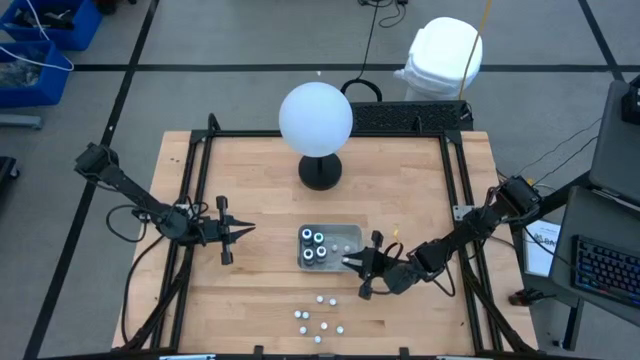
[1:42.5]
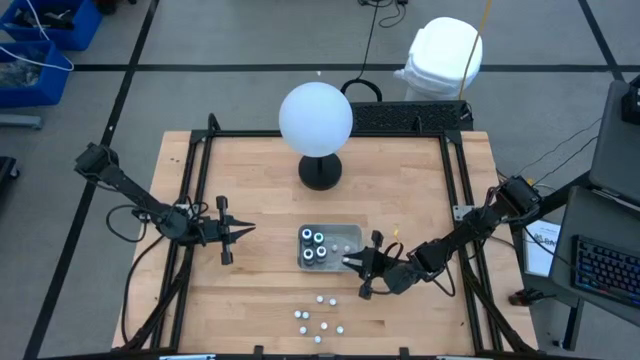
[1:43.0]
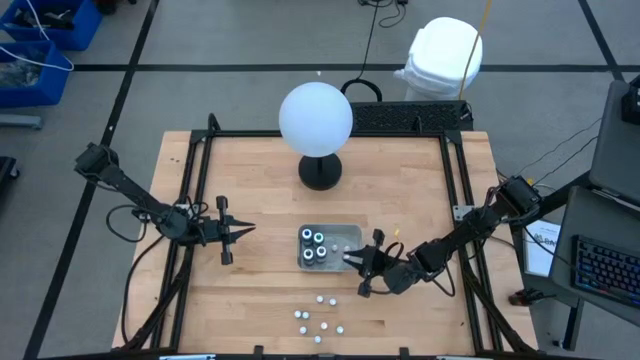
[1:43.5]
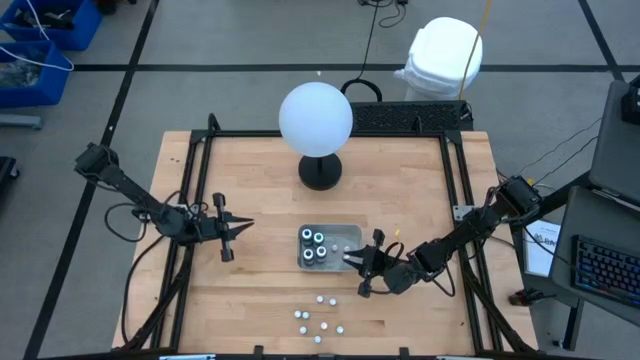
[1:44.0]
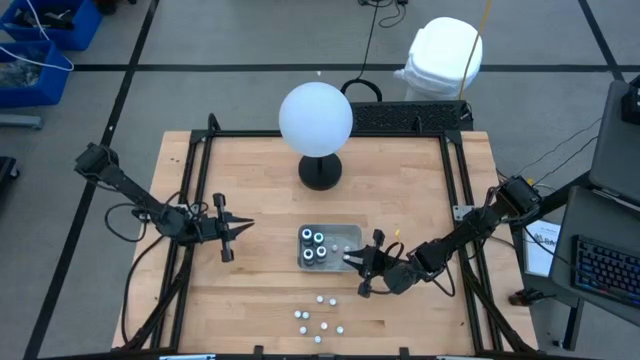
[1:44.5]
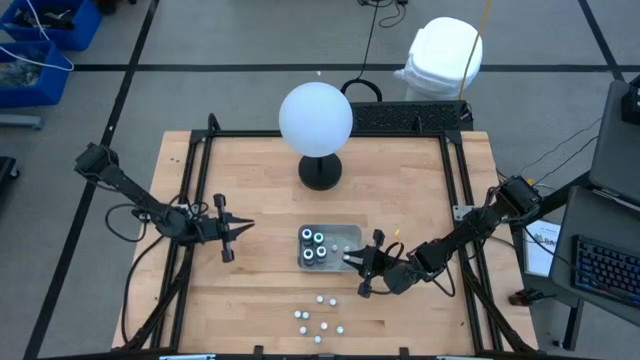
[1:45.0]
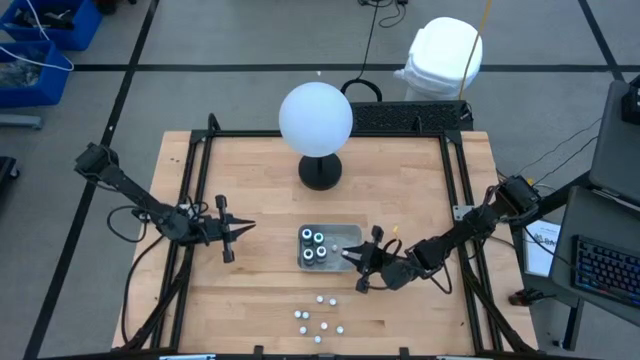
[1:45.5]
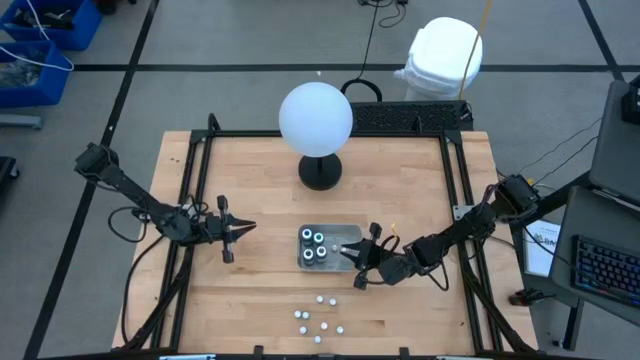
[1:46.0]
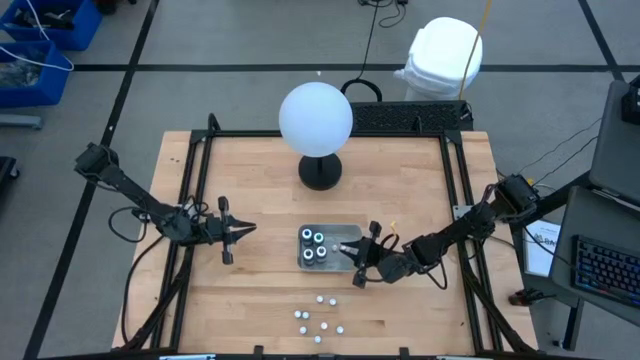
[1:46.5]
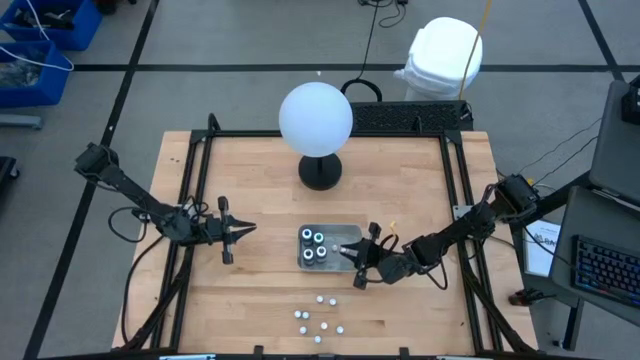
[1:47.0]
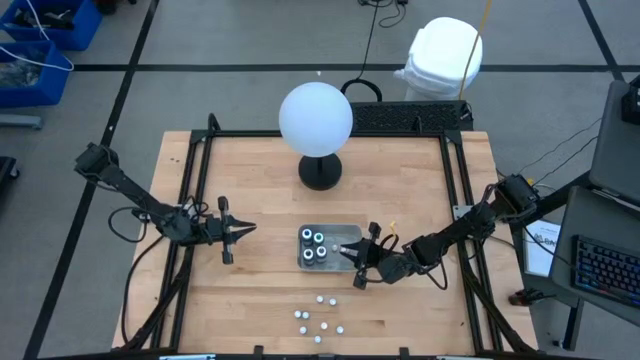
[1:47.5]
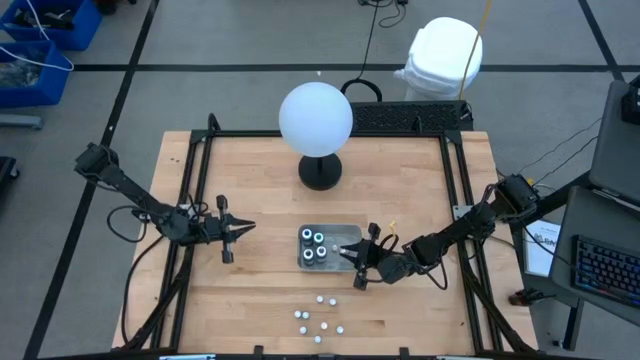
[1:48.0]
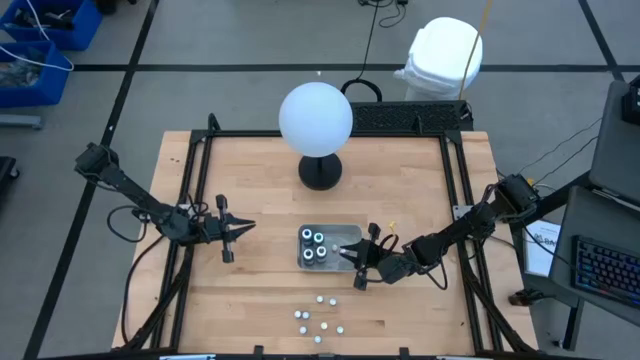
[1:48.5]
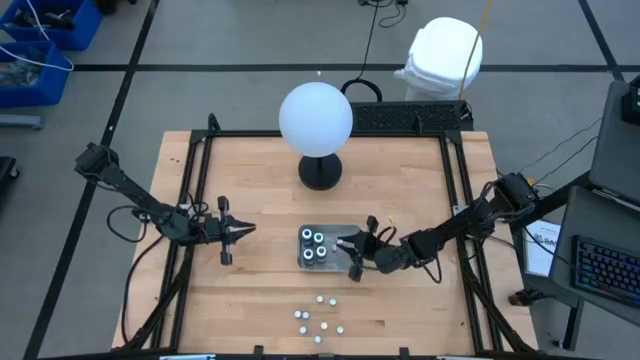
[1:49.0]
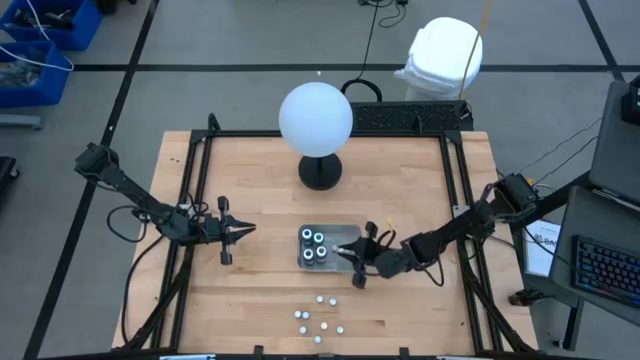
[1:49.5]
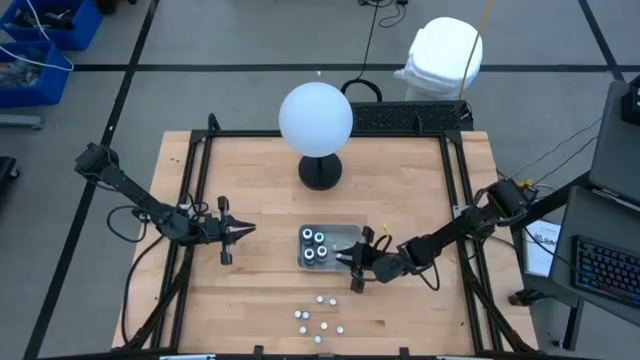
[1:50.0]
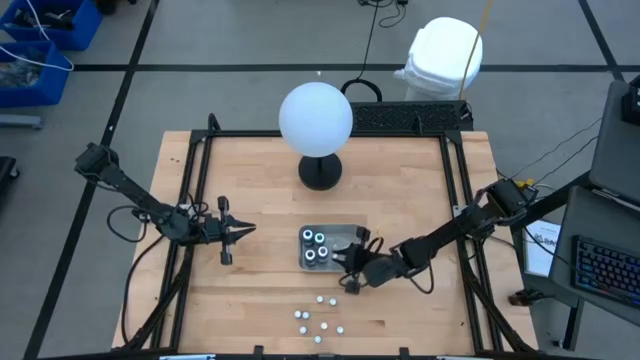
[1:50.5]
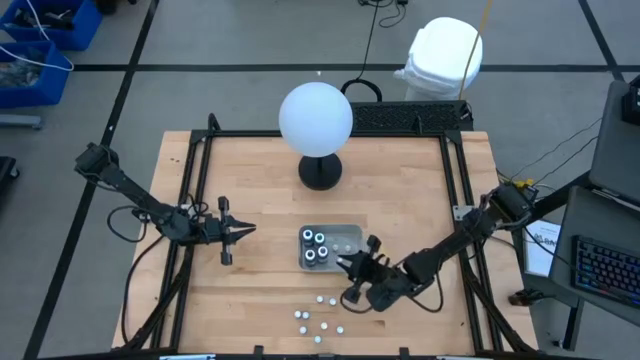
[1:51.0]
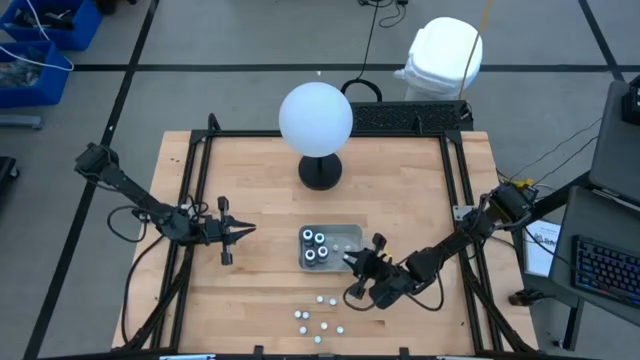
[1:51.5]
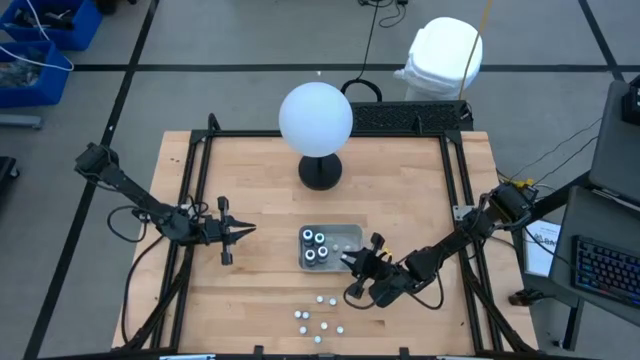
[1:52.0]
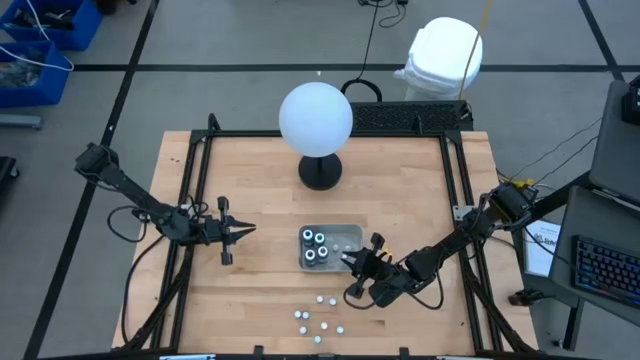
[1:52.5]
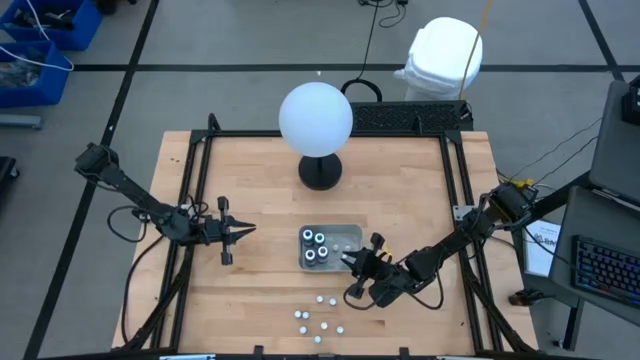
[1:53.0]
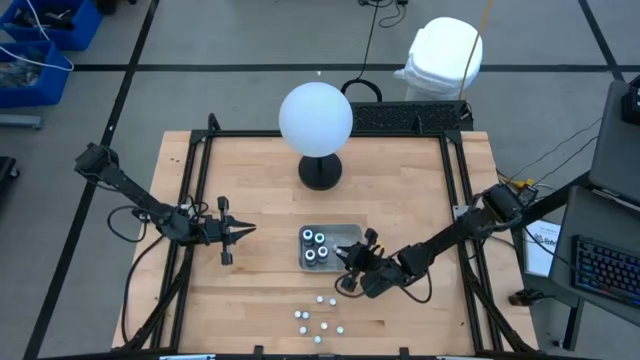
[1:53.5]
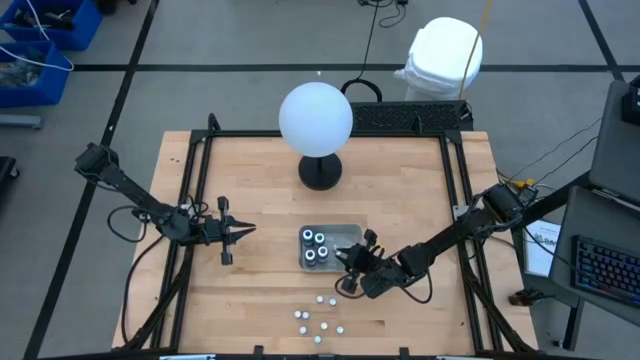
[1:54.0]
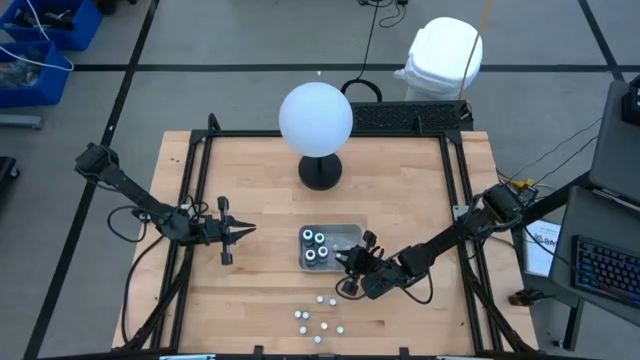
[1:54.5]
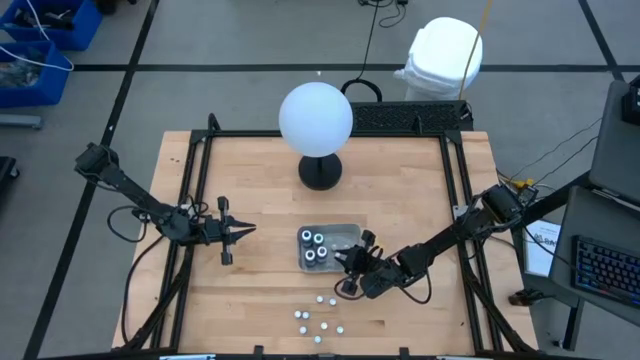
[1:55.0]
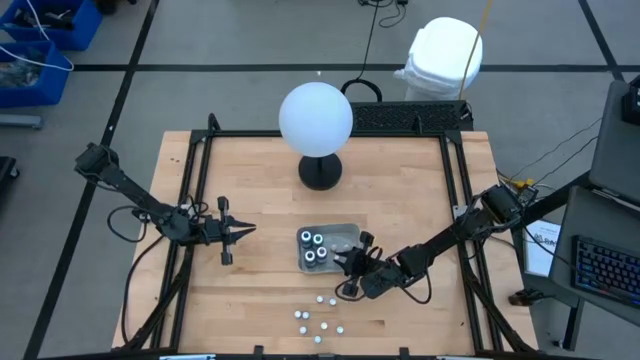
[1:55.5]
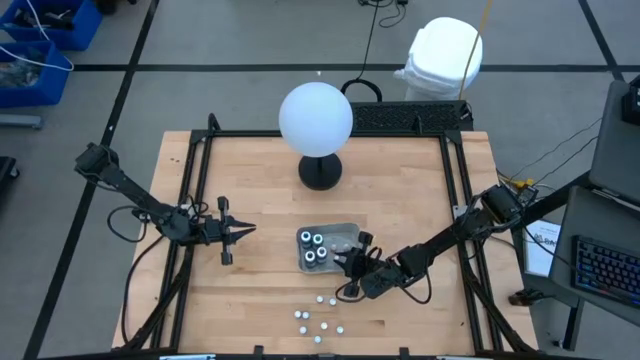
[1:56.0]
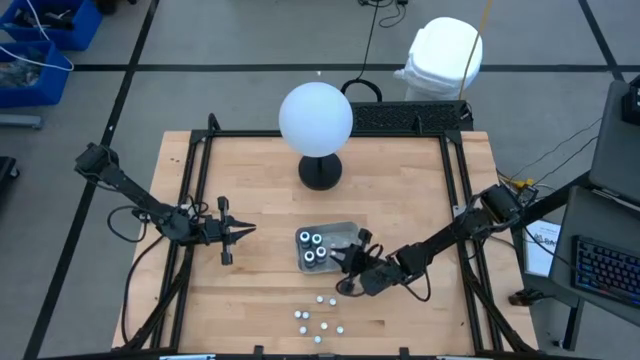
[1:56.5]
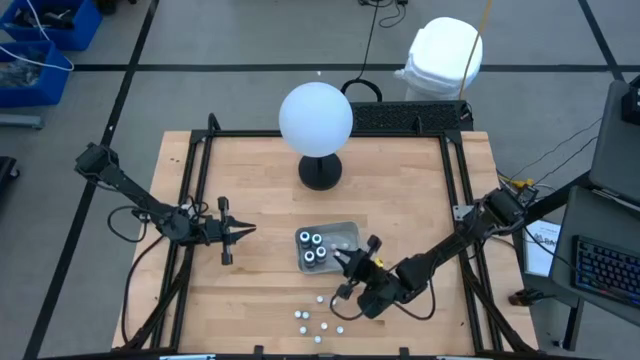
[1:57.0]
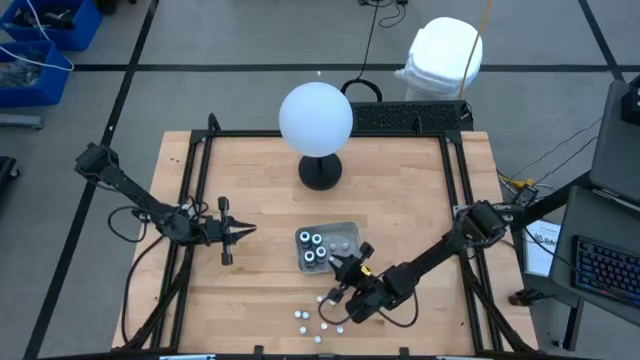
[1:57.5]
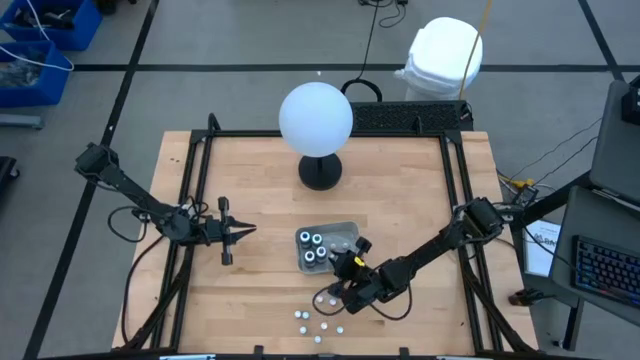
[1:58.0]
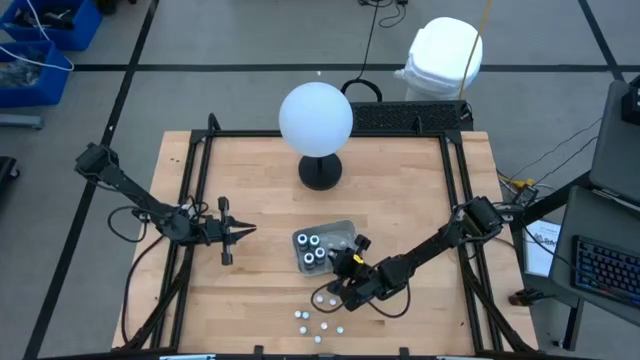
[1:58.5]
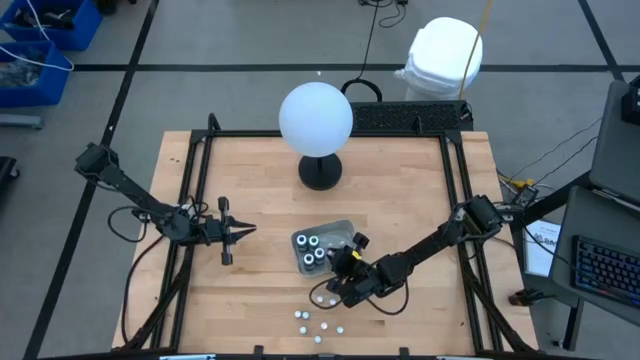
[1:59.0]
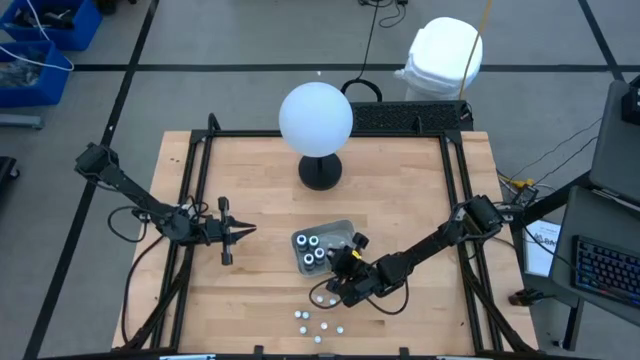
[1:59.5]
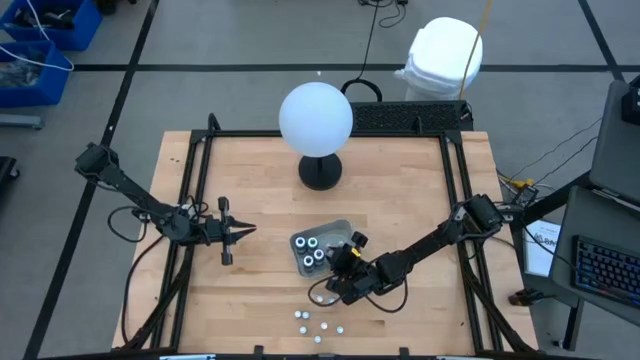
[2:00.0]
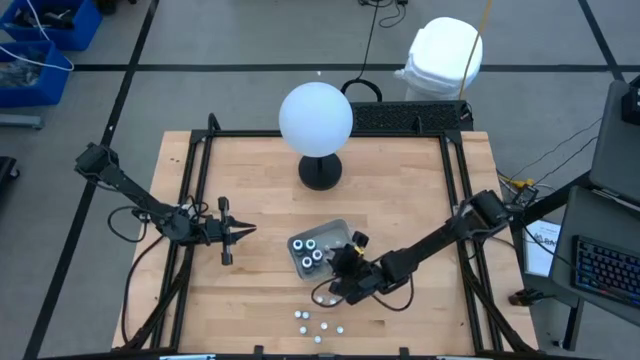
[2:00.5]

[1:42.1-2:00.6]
Task: Pick & Place food coloring
Put the small orange food coloring bottle into the gray bin
